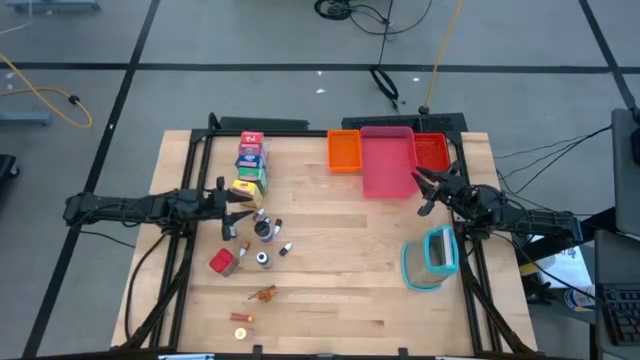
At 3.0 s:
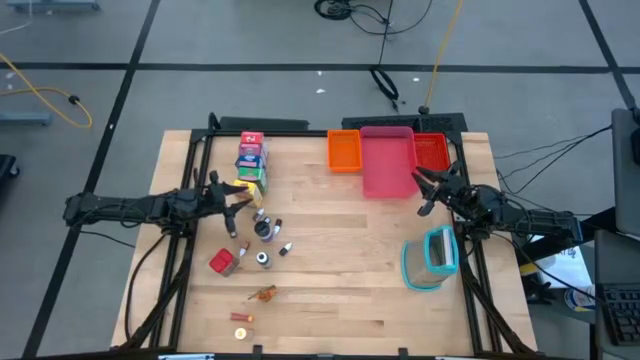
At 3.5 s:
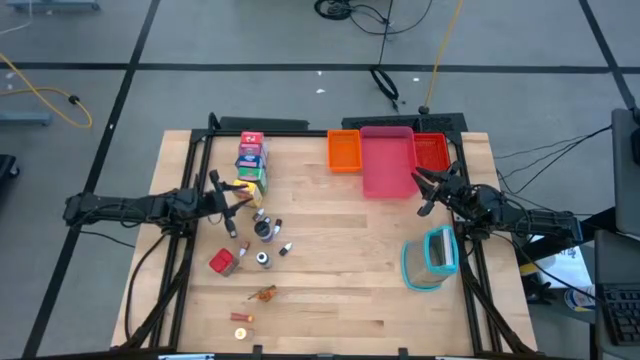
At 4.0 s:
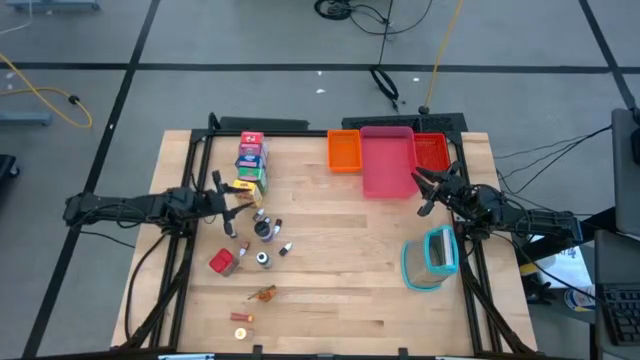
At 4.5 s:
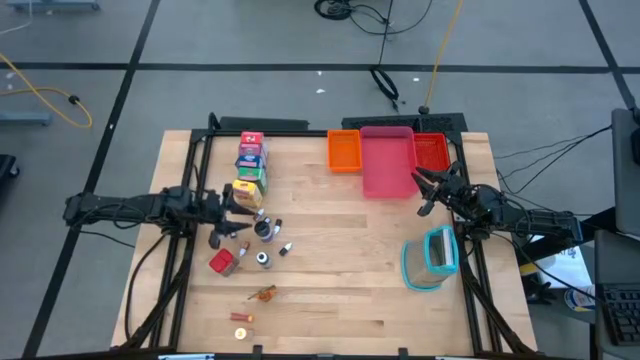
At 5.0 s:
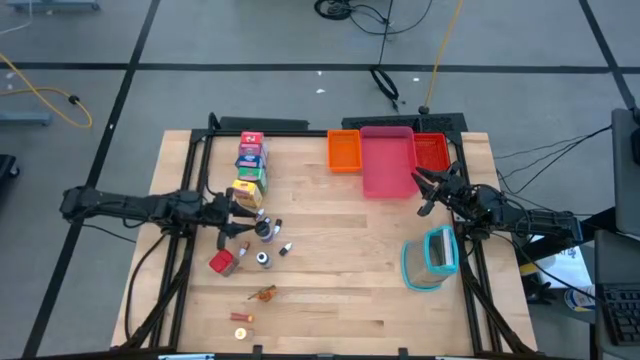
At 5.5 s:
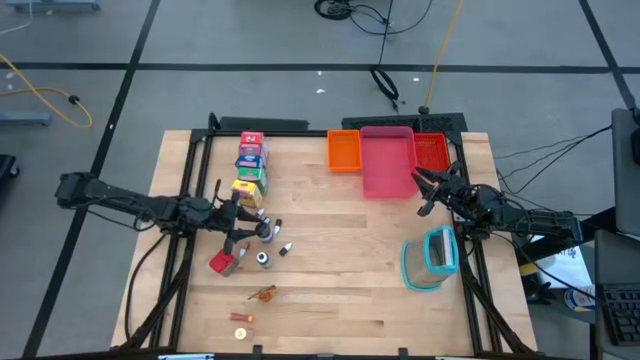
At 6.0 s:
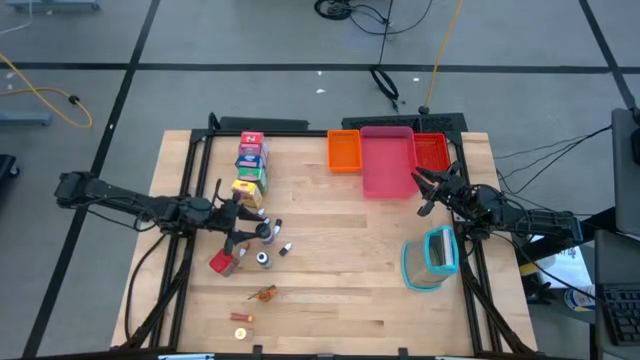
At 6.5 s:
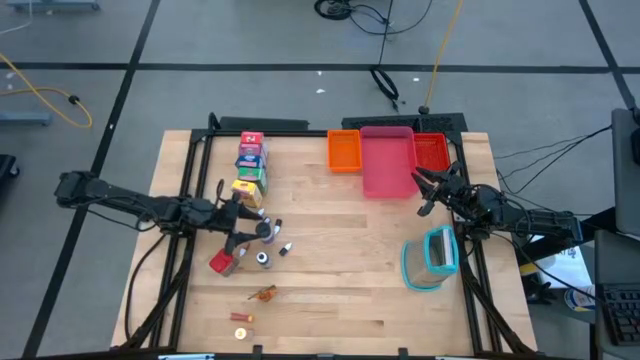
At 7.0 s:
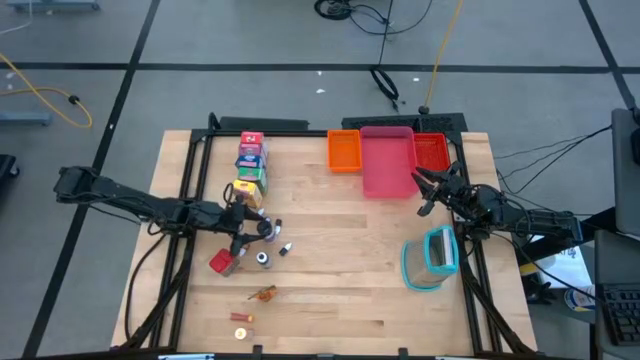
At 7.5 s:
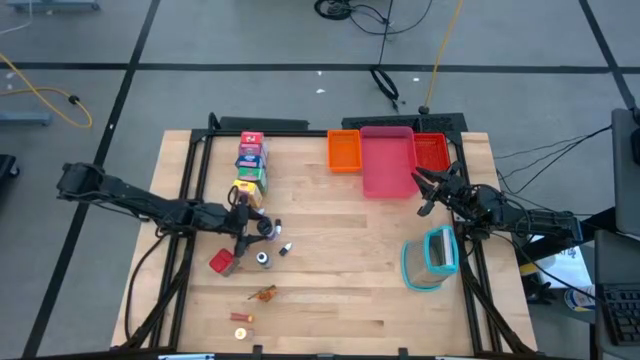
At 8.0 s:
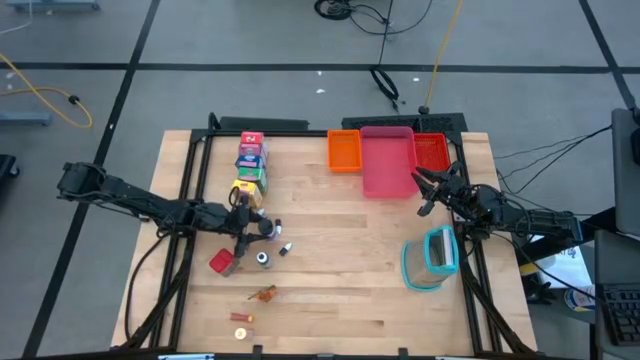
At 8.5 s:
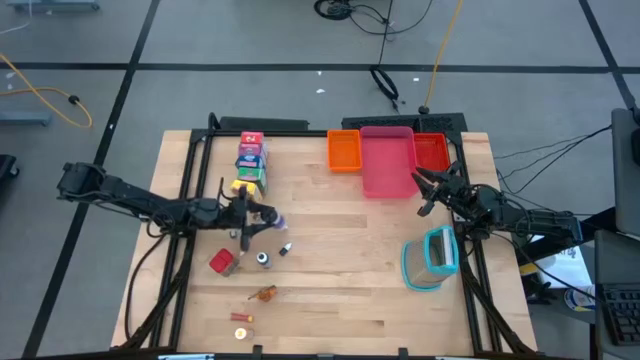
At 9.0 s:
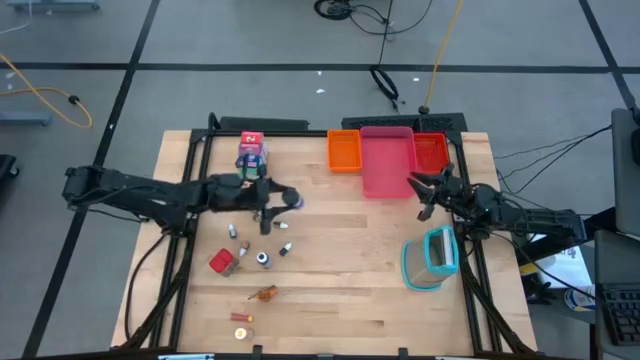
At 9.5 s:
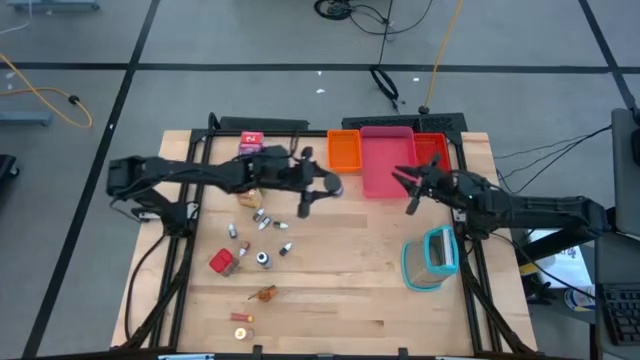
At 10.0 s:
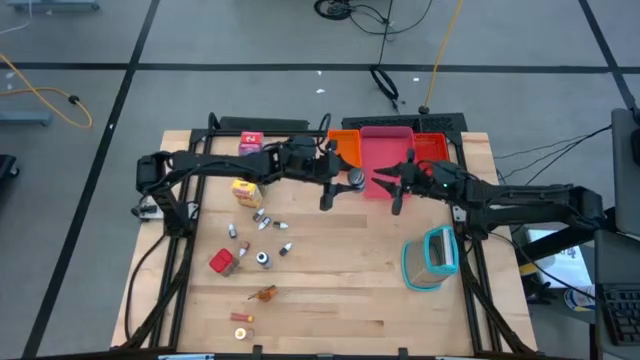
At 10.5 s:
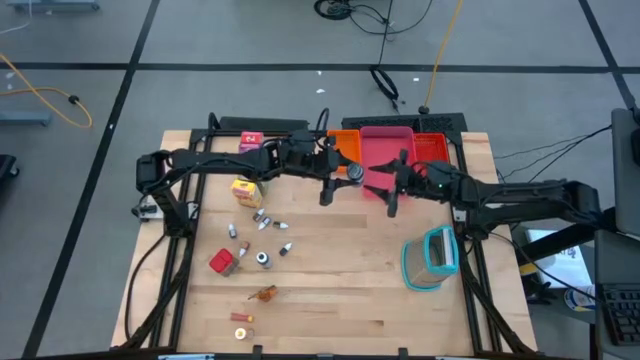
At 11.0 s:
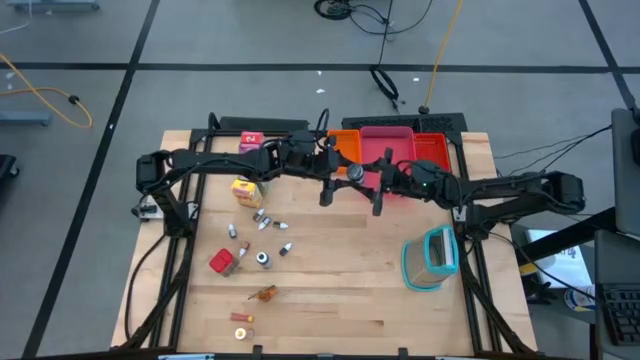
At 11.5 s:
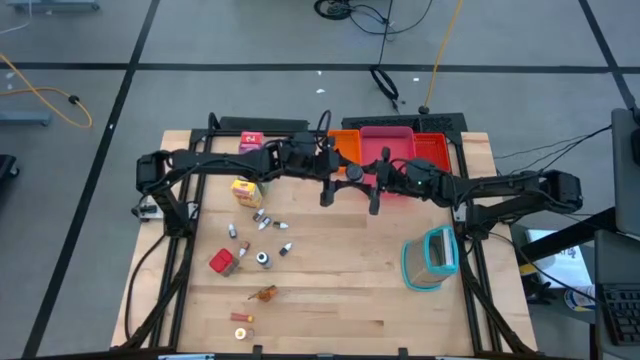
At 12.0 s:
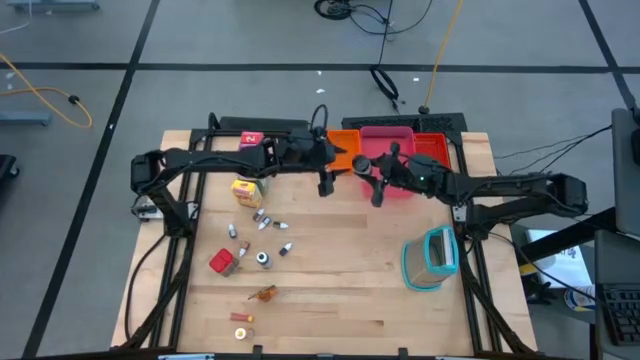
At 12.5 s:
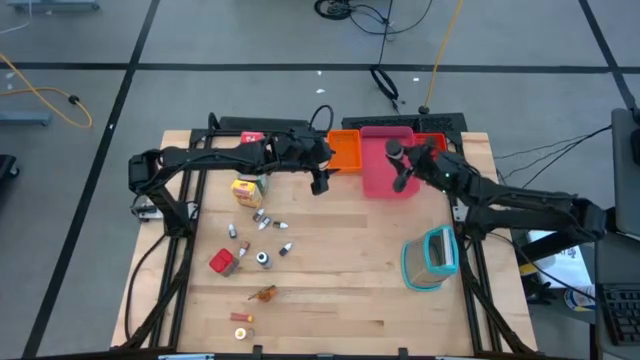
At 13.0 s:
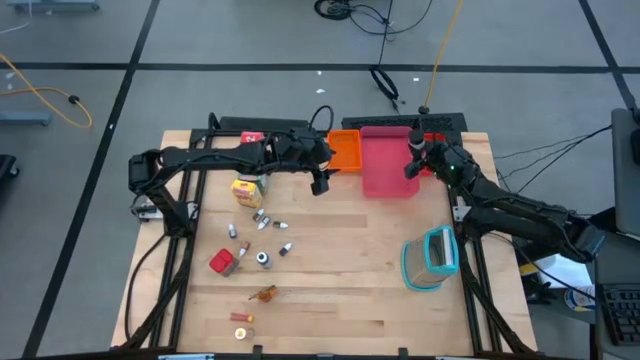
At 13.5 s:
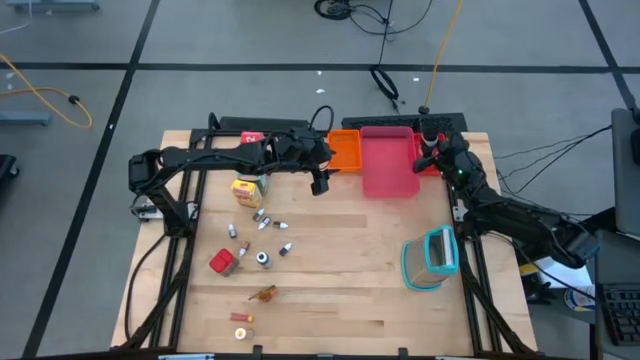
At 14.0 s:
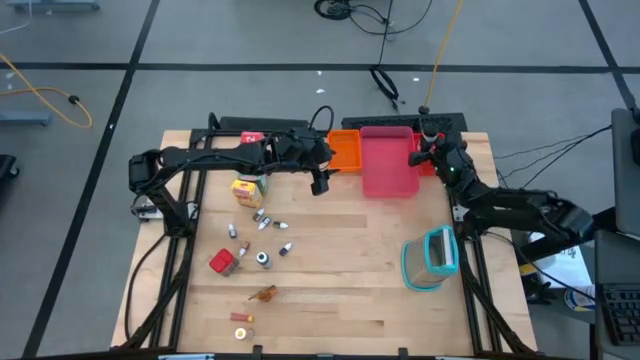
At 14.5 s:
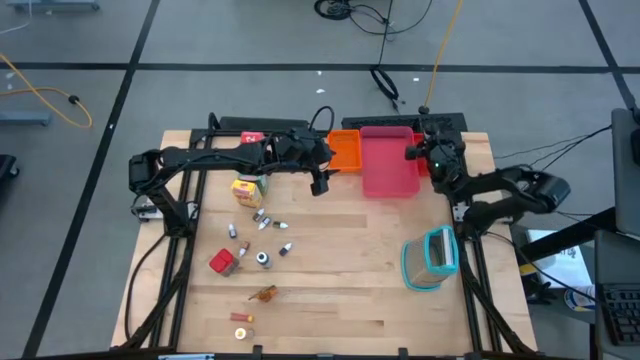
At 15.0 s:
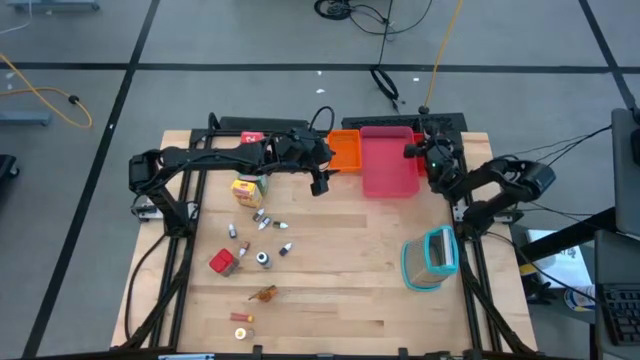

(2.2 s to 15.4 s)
Task: Pick & Place Kitchen Items
Put the purple spice bottle into the red bin

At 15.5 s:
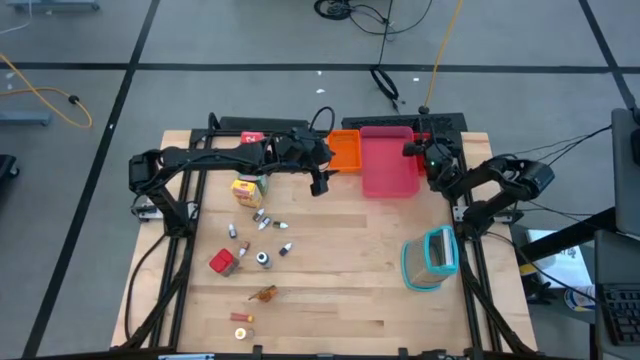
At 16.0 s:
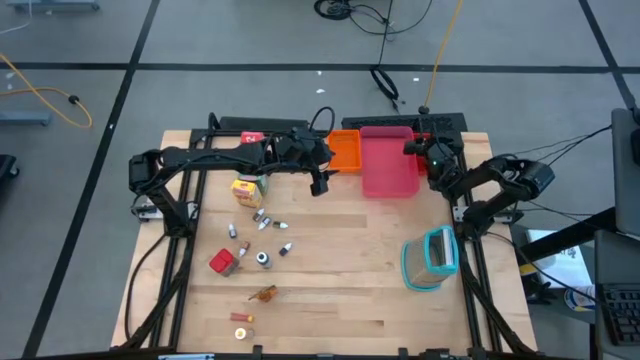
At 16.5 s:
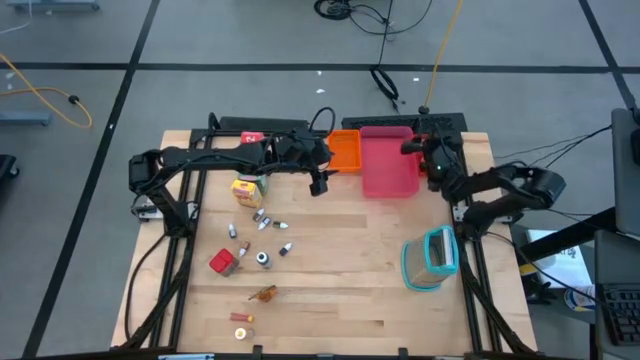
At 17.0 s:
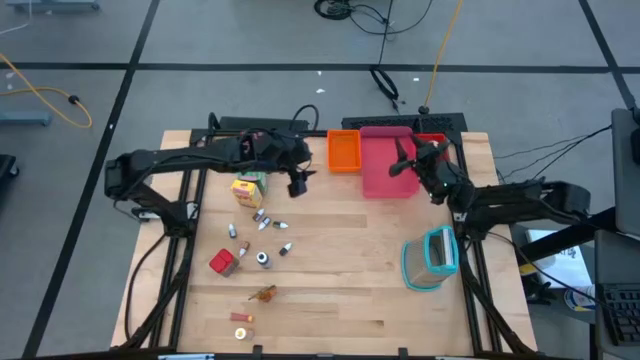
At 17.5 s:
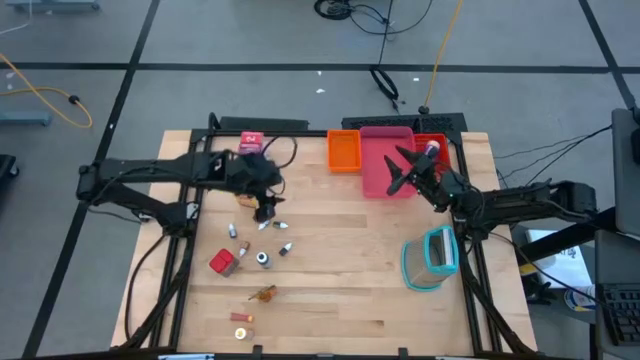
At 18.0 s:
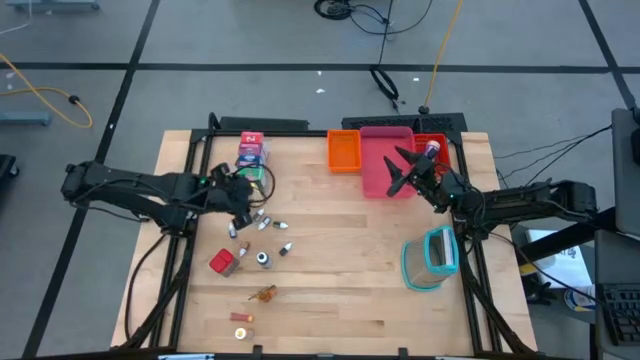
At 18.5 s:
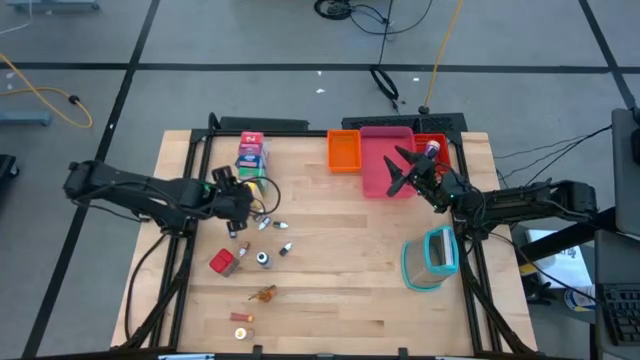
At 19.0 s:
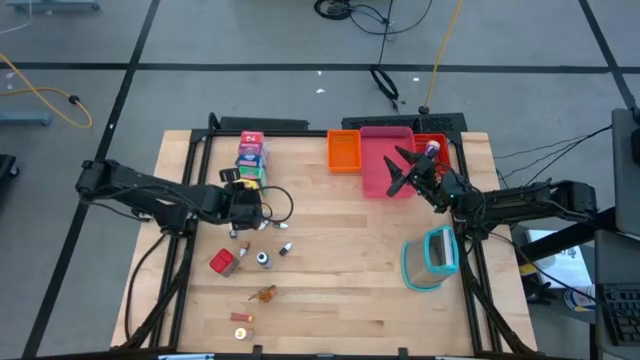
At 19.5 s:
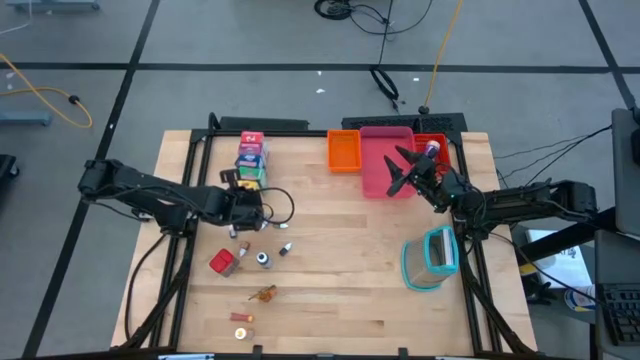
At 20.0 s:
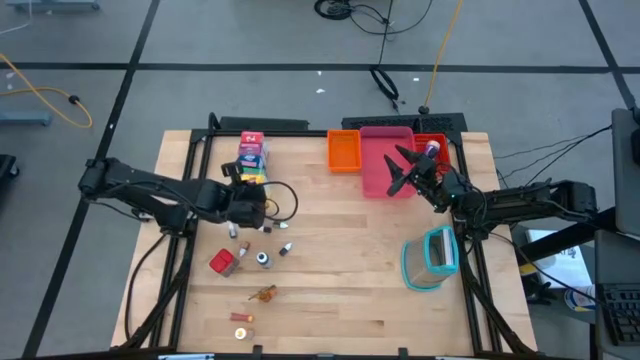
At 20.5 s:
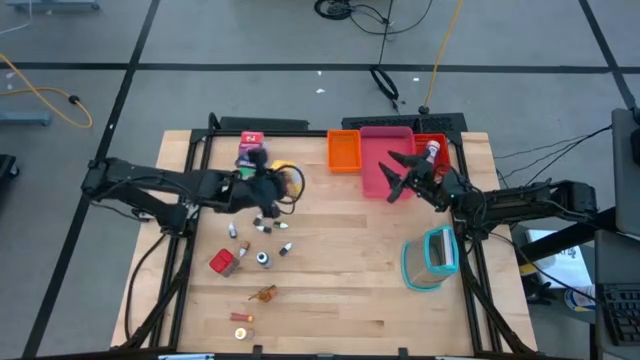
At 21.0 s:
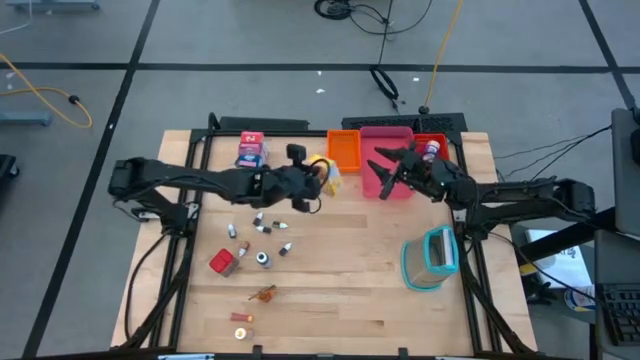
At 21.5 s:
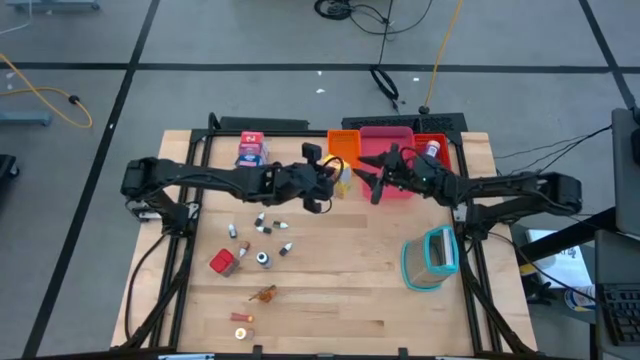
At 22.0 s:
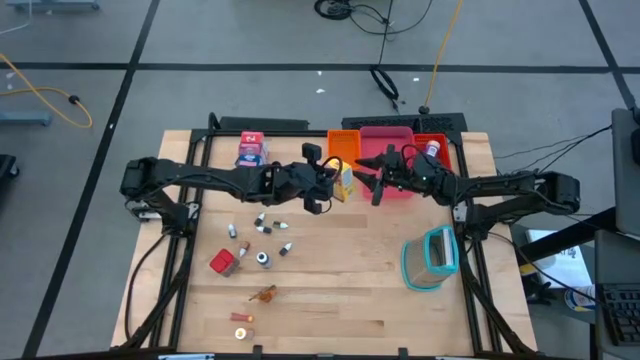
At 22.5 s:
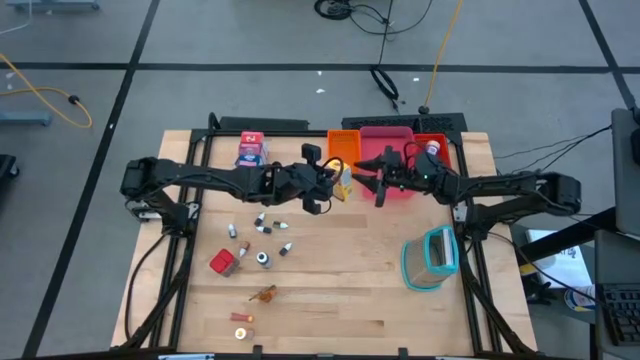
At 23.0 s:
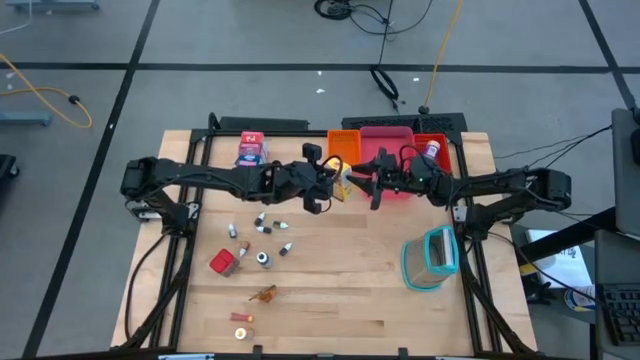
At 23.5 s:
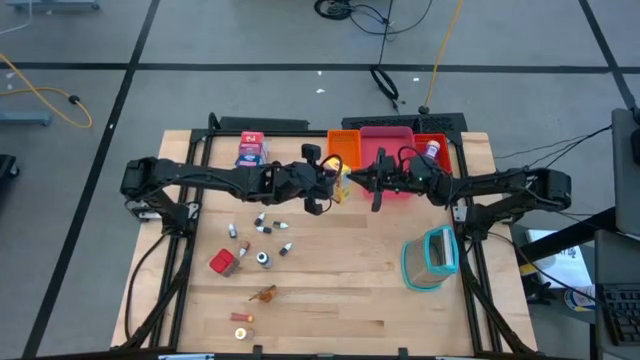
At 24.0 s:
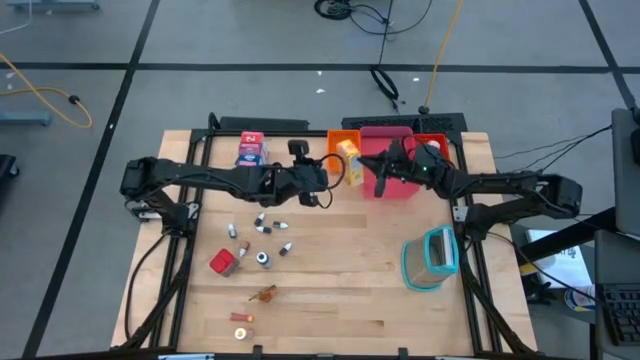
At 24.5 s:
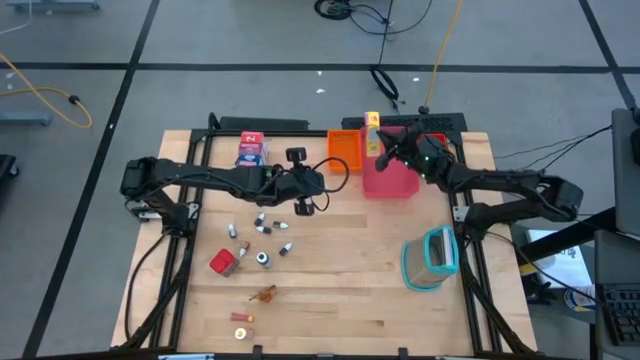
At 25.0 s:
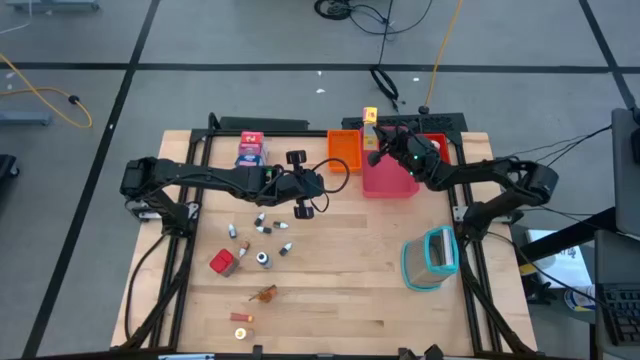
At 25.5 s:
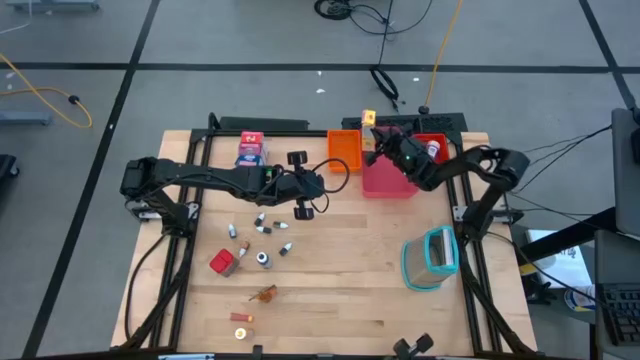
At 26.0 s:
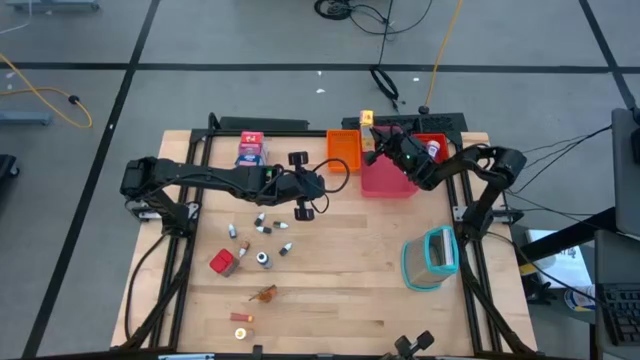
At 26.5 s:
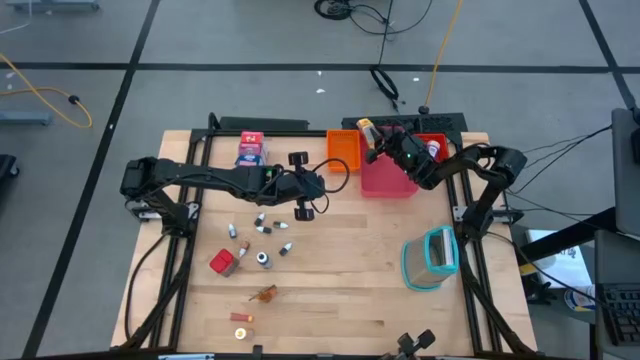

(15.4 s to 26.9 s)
Put the yellow cereal box into the pink bin
